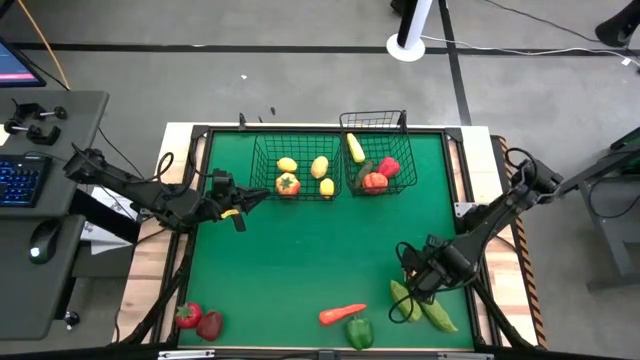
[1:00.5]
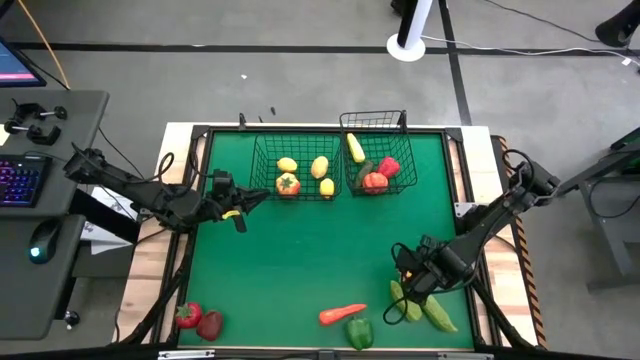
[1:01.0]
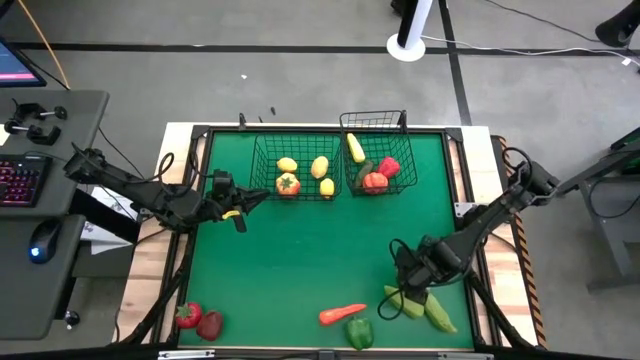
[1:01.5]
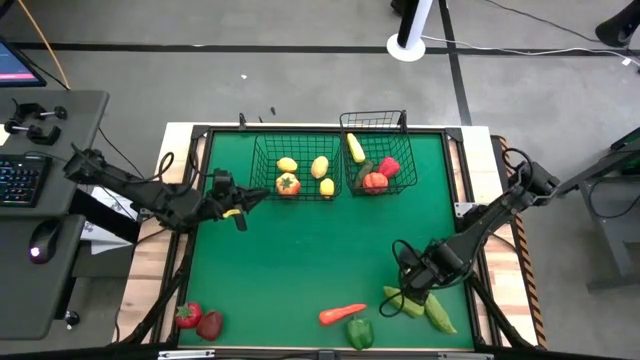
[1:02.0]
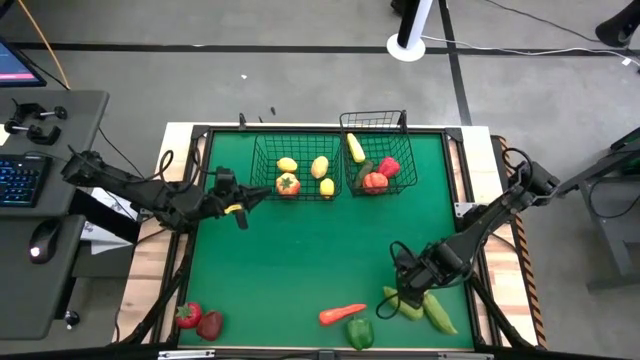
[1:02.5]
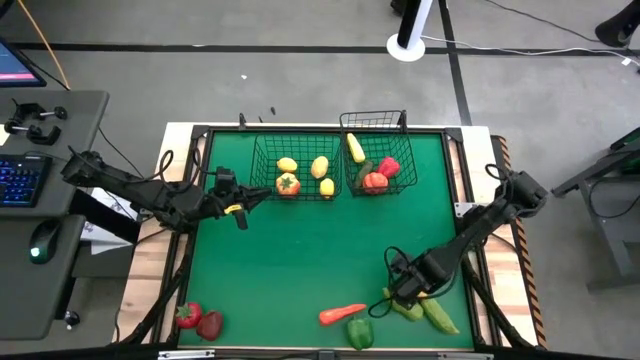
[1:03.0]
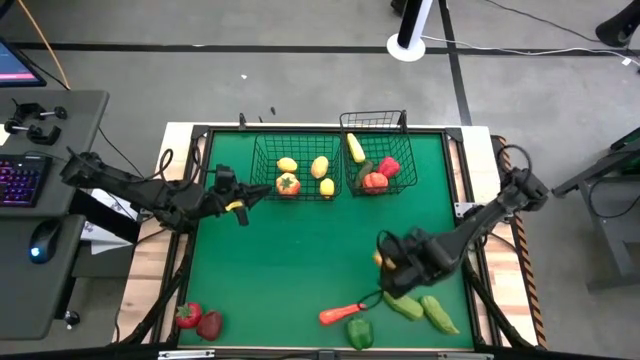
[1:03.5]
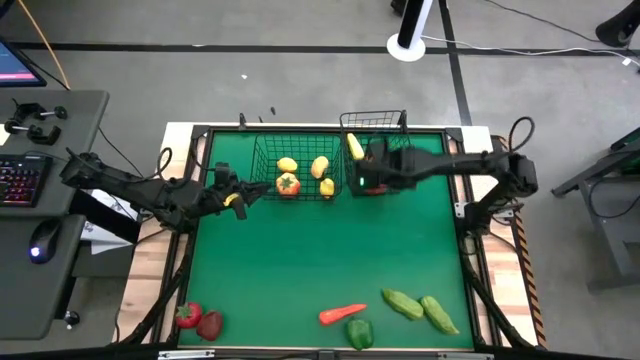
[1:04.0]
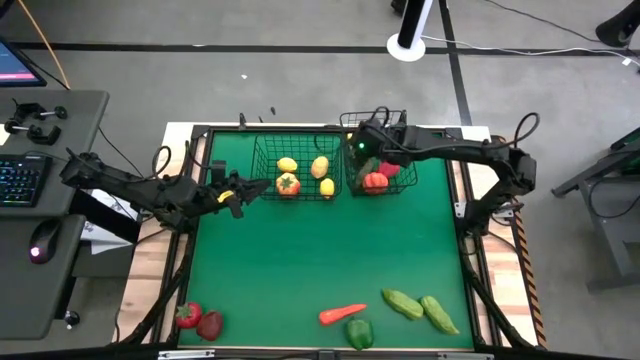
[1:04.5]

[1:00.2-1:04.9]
Task: Sort produce into baskets
Put the yellow bell pepper into the right wire basket

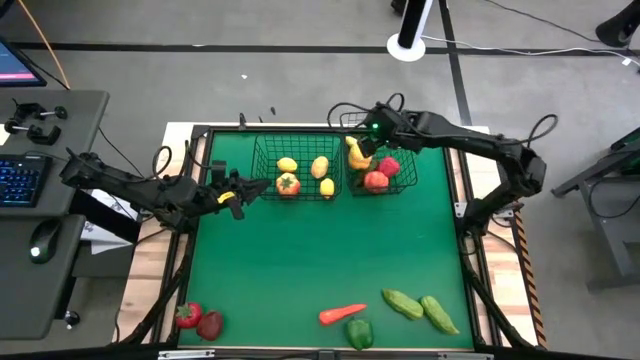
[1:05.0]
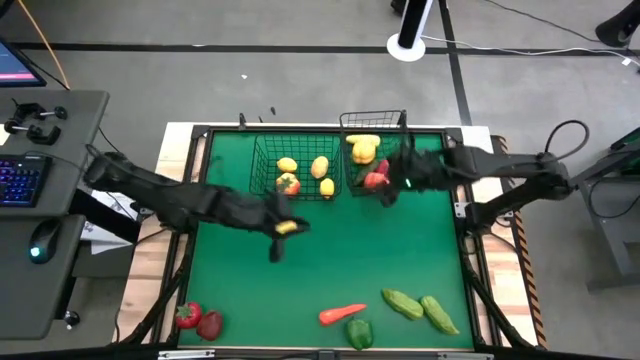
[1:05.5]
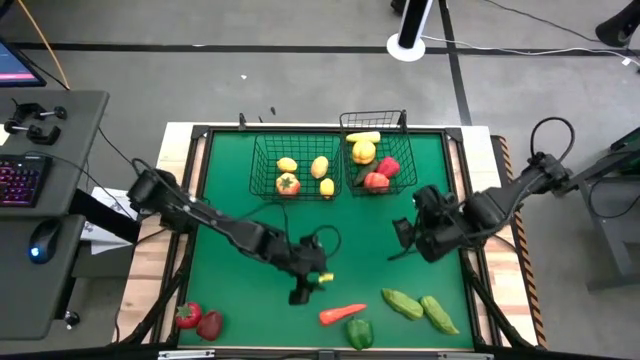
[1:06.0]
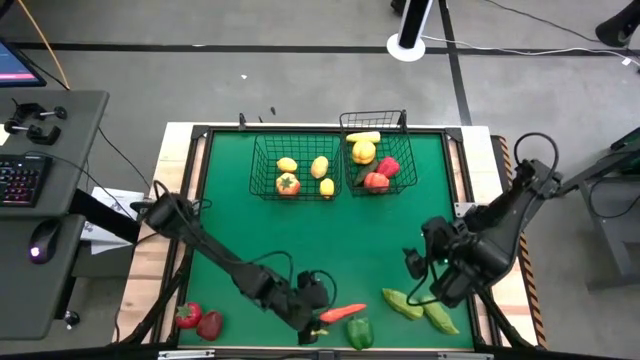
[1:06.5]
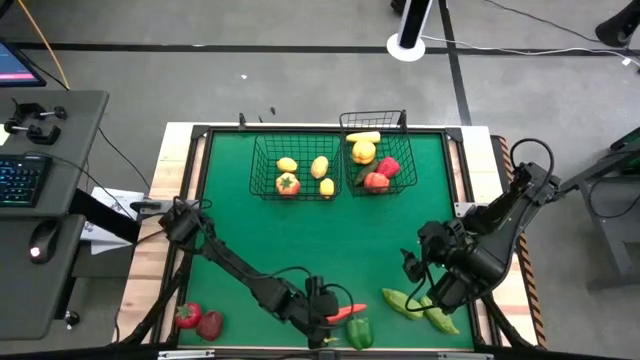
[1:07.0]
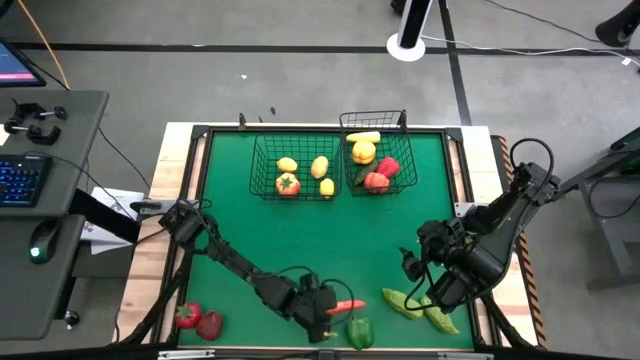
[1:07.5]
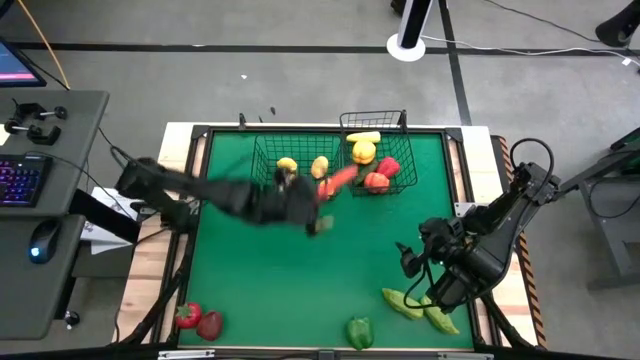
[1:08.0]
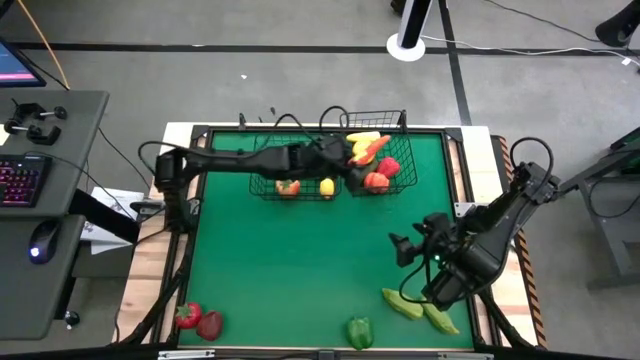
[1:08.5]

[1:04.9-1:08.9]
Put the red chili pepper into the right wire basket

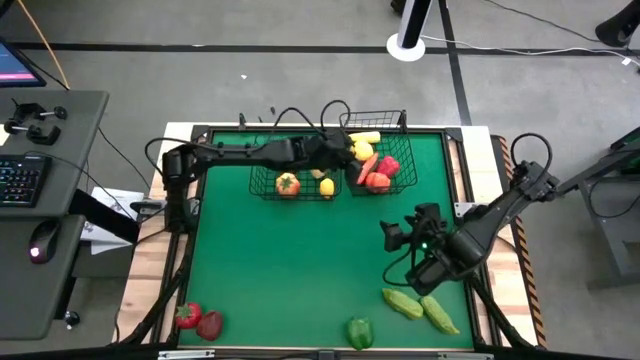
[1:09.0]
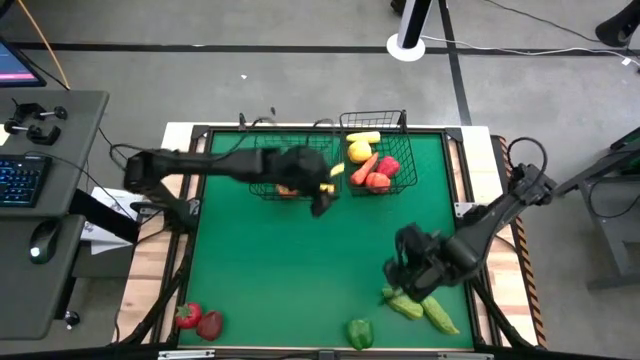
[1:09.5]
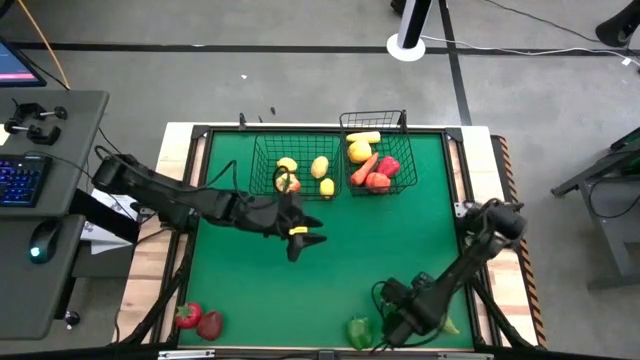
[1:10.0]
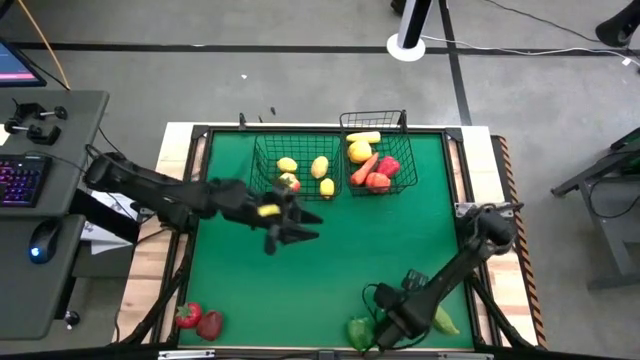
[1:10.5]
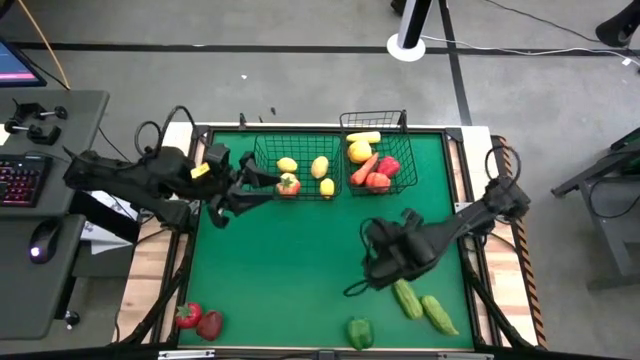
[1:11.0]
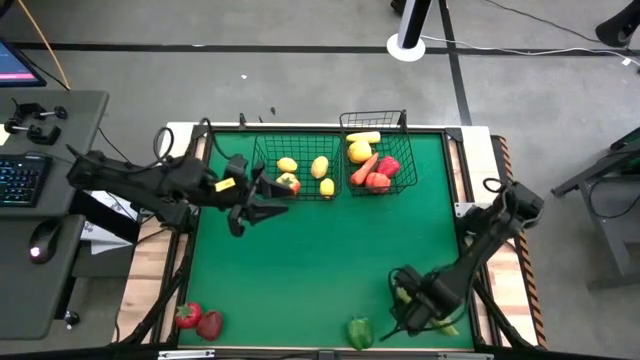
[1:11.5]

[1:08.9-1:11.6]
Put the left green cucumber into the right wire basket

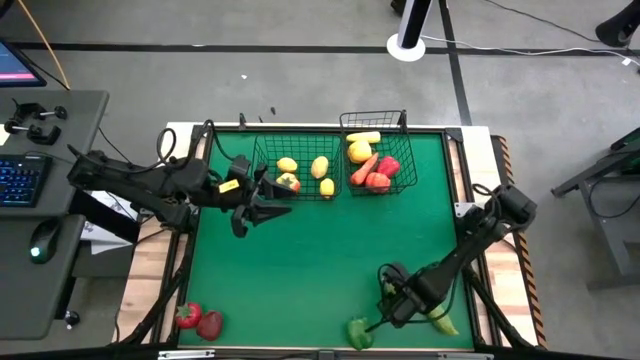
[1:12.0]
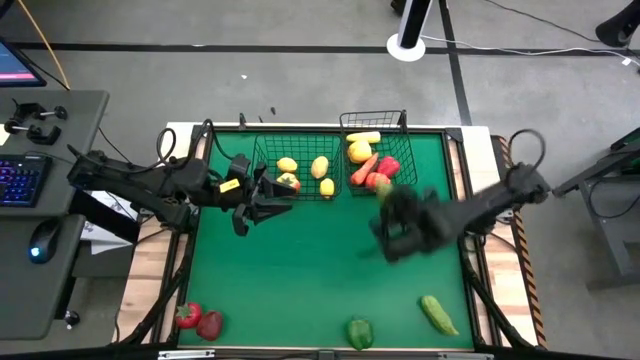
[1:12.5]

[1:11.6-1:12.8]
Put the left green cucumber into the right wire basket

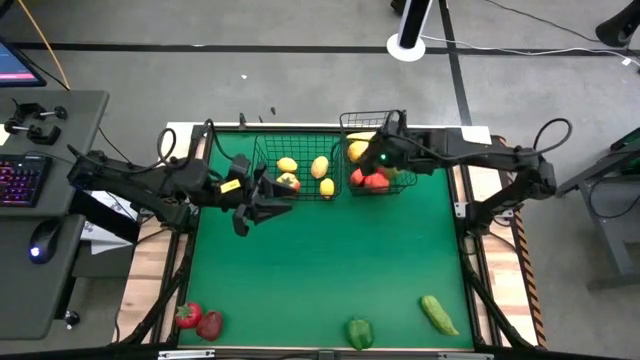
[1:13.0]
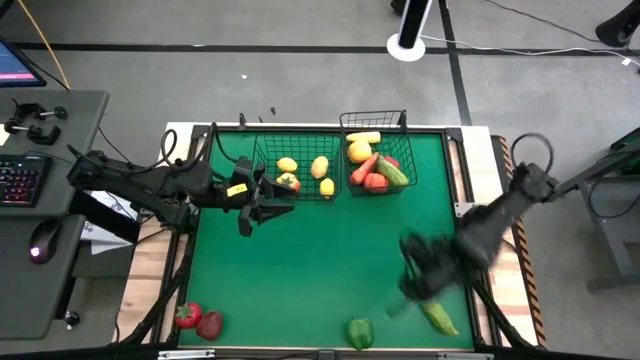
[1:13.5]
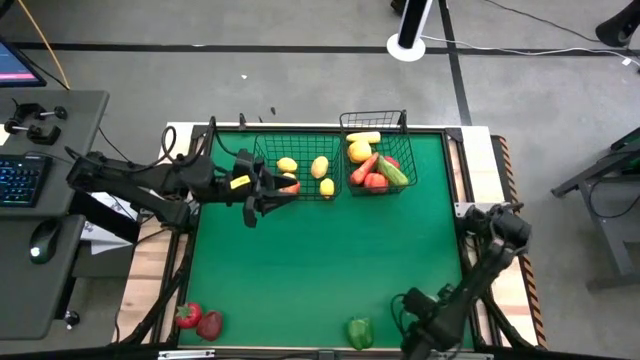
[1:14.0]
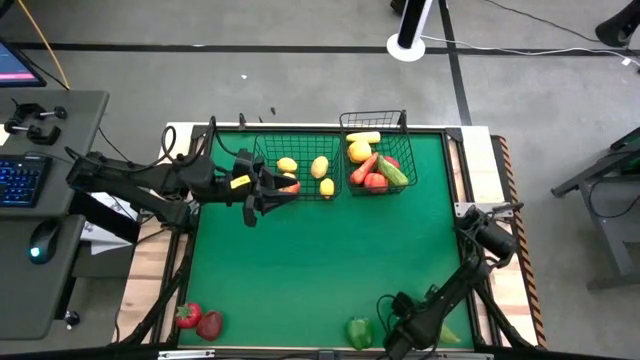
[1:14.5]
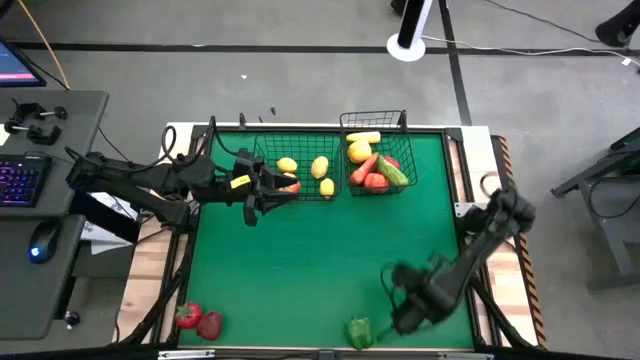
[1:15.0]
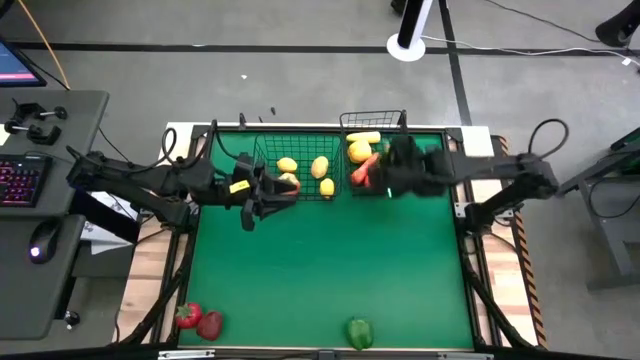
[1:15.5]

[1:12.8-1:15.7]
Put the green cucumber into the right wire basket

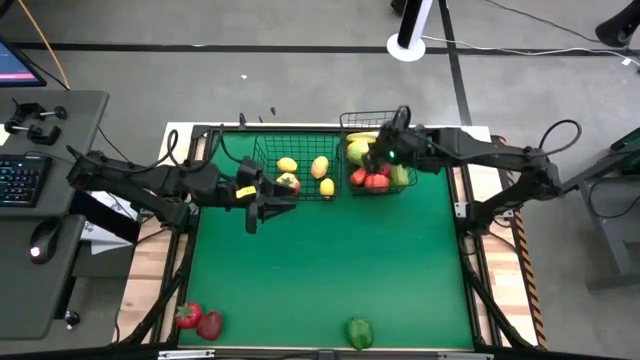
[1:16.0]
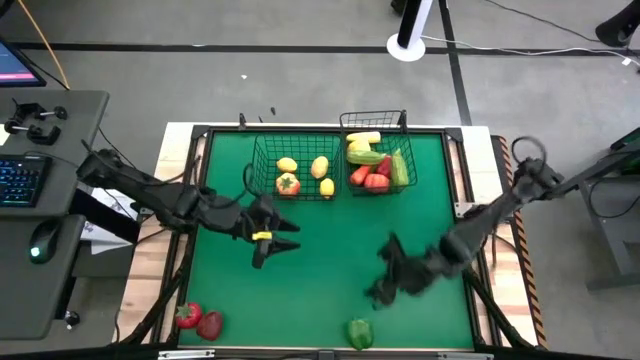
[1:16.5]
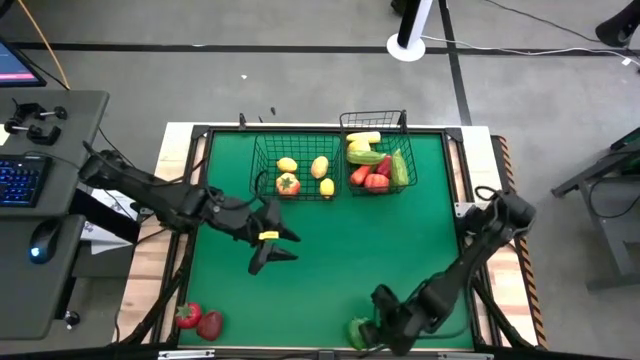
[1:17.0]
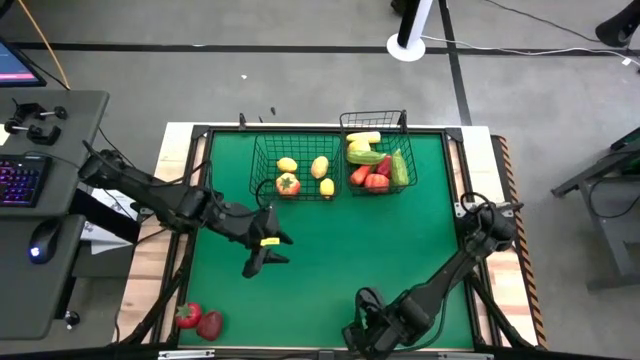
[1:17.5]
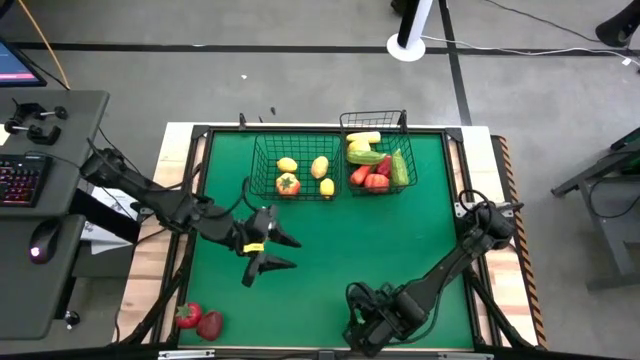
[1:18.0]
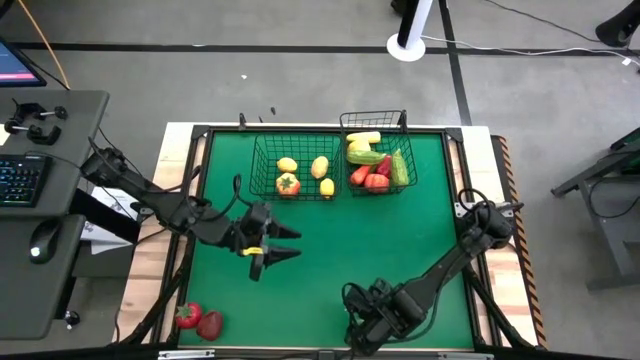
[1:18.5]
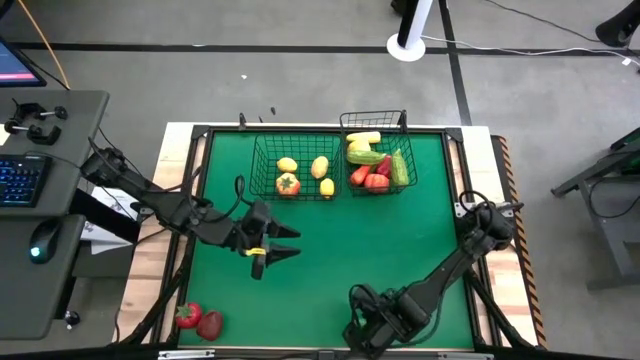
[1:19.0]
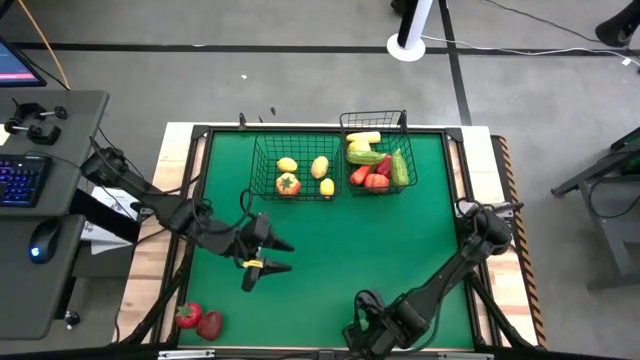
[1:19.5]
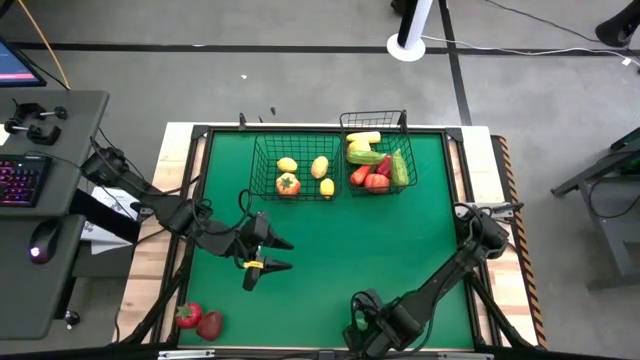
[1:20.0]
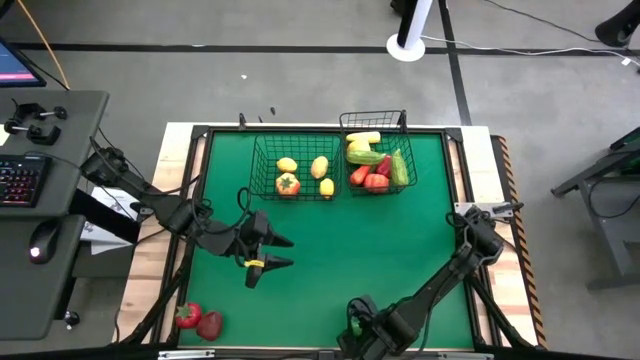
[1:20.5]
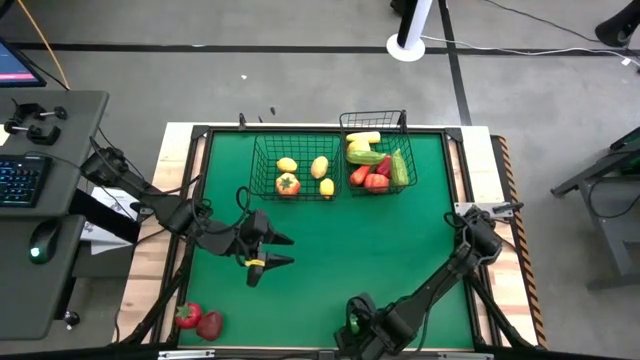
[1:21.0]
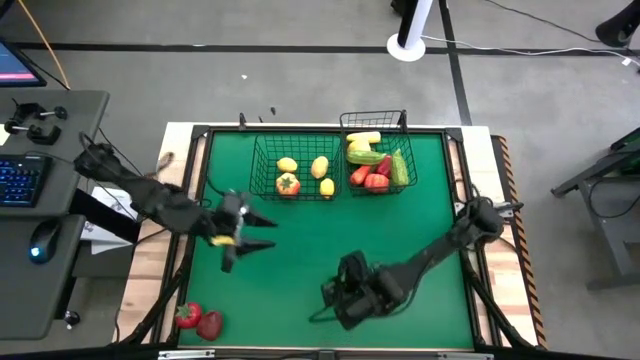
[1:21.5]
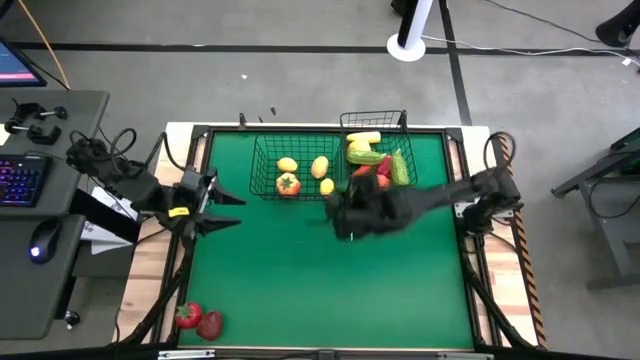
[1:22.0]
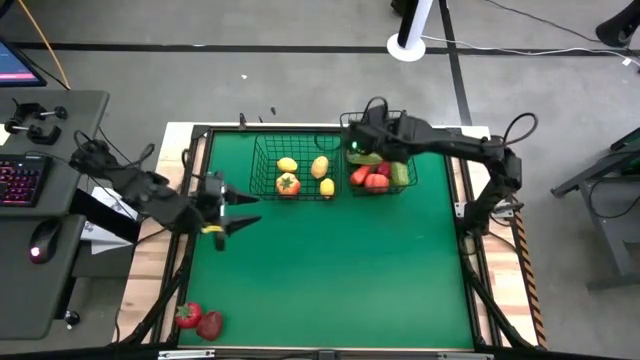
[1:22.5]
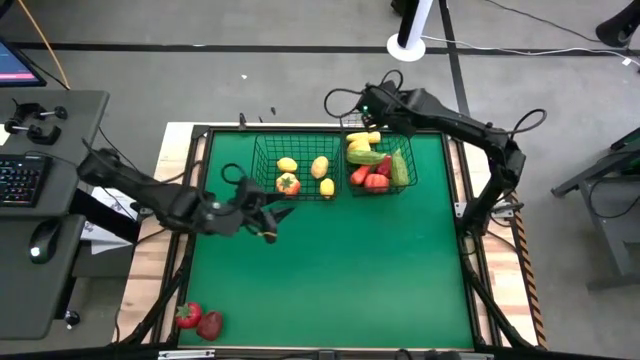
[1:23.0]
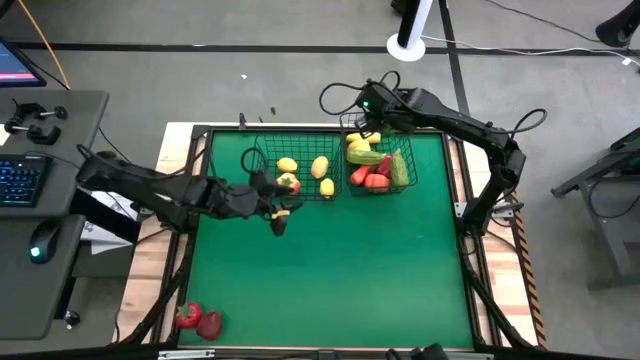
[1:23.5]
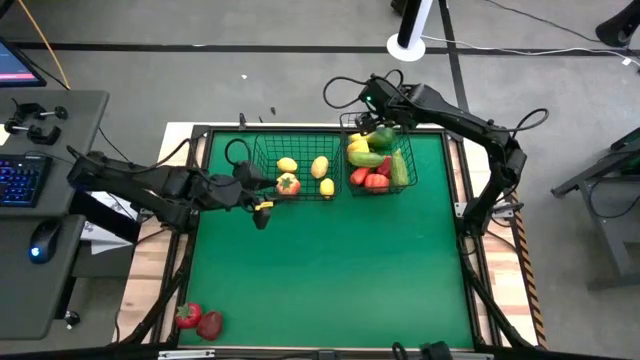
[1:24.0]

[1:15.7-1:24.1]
Put the green bell pepper into the right wire basket
